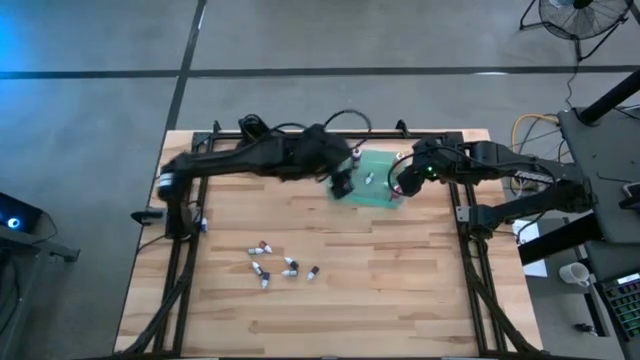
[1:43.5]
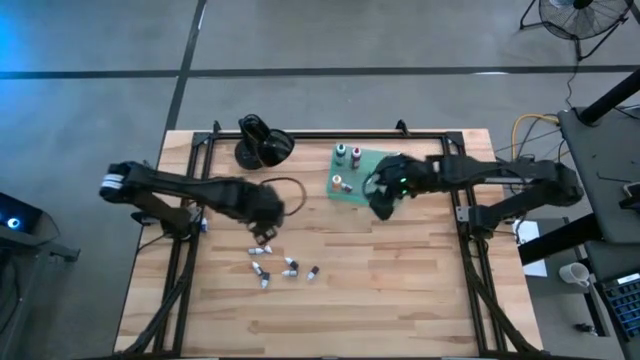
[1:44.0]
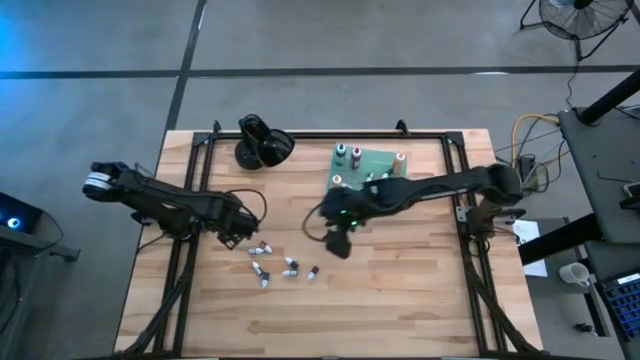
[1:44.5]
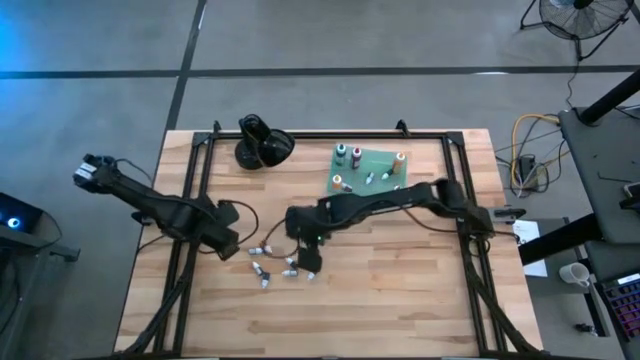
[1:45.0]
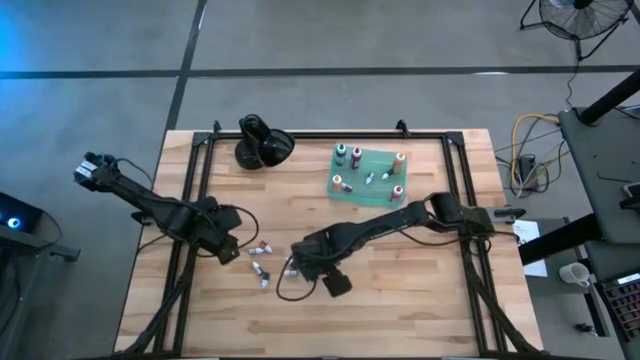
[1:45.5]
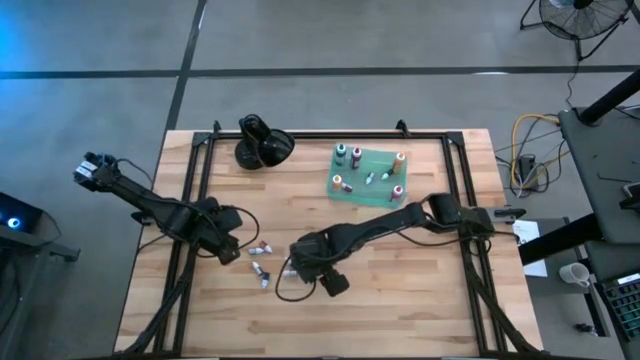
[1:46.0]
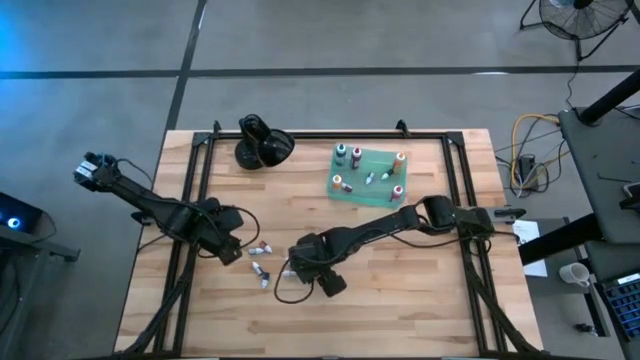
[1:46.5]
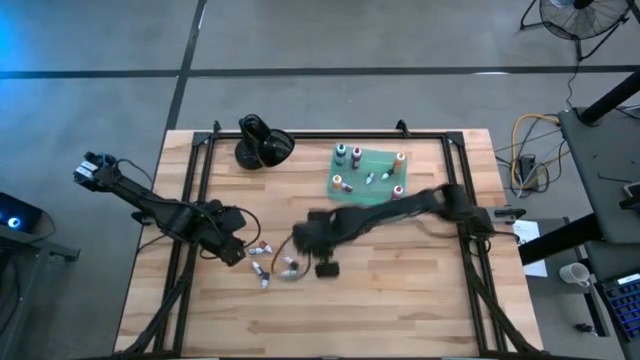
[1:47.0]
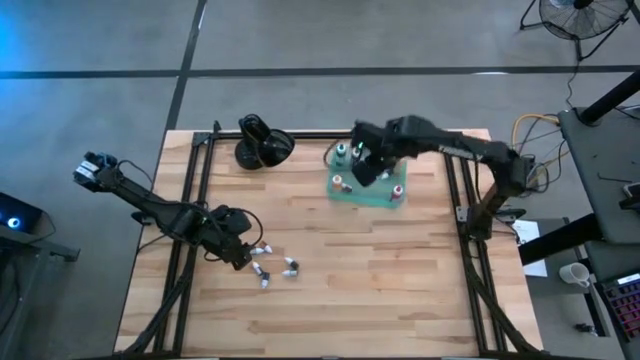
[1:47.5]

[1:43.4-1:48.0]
Task: Pick & Place food coloring
Put the red food coloring bottle into the green bin

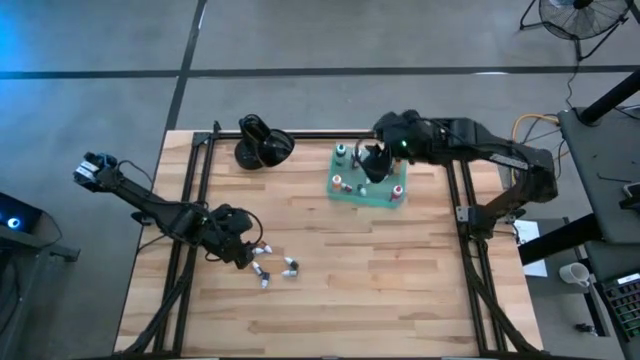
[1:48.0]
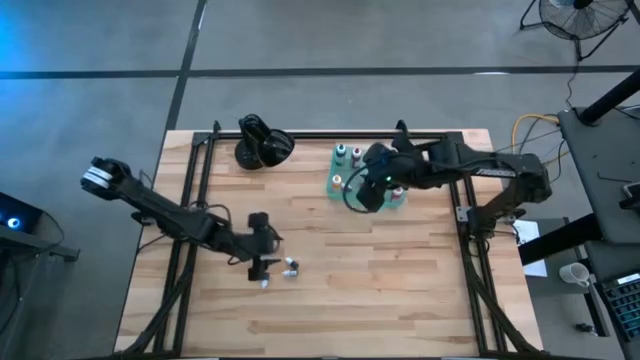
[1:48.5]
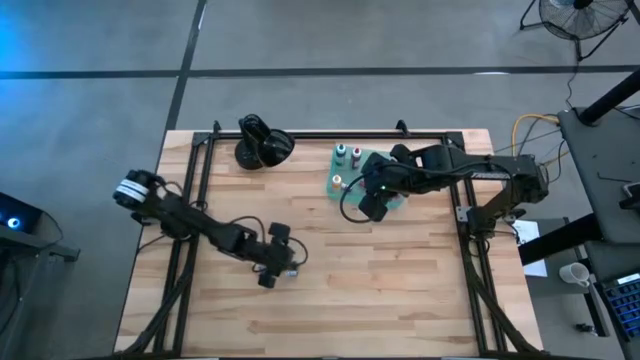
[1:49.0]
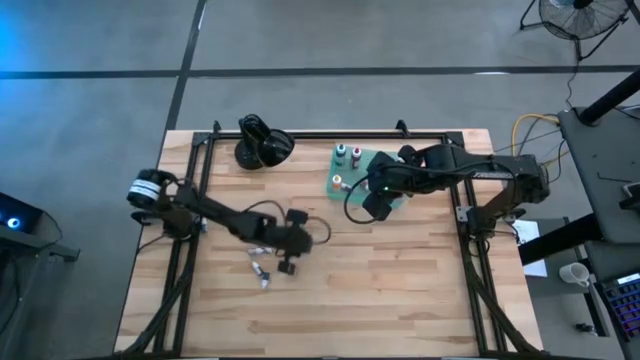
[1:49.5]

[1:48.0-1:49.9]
Put the green food coloring bottle into the green bin

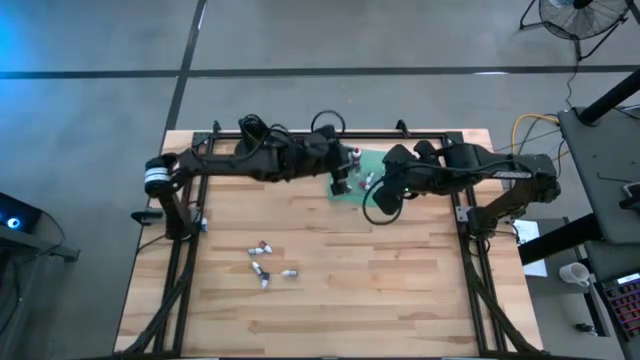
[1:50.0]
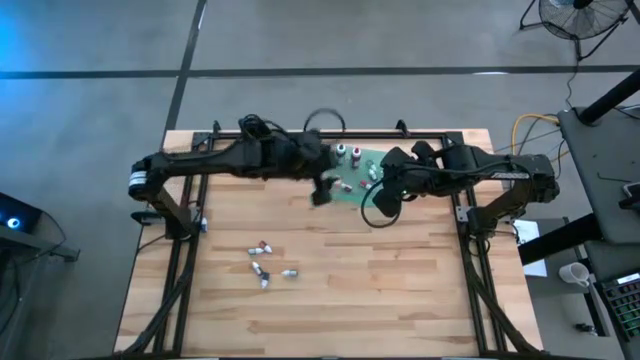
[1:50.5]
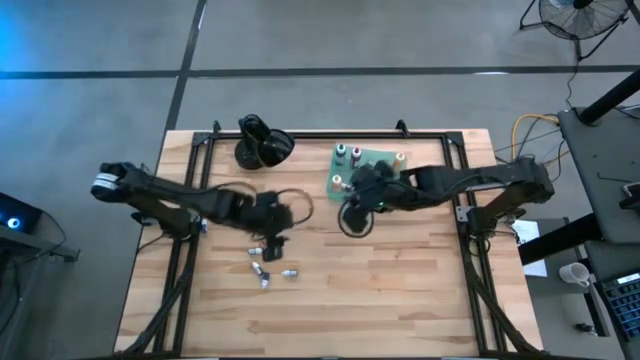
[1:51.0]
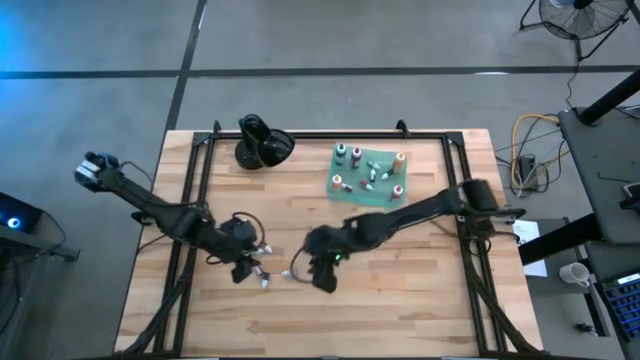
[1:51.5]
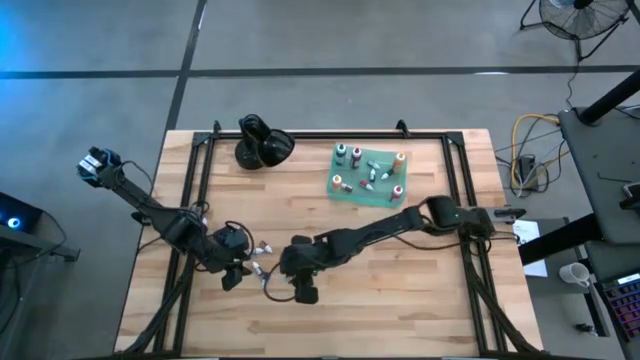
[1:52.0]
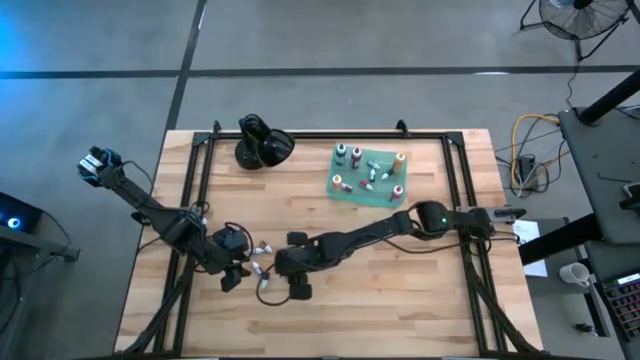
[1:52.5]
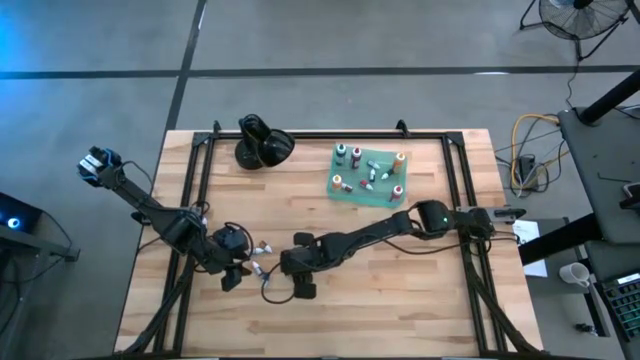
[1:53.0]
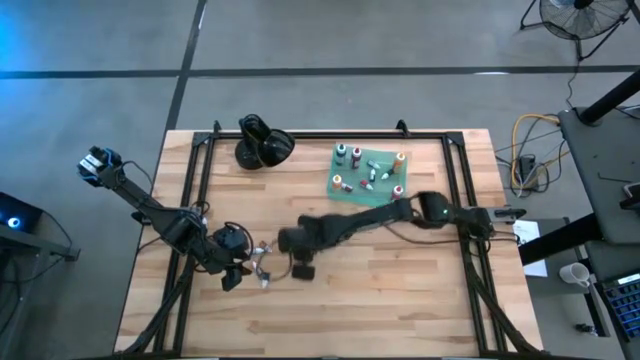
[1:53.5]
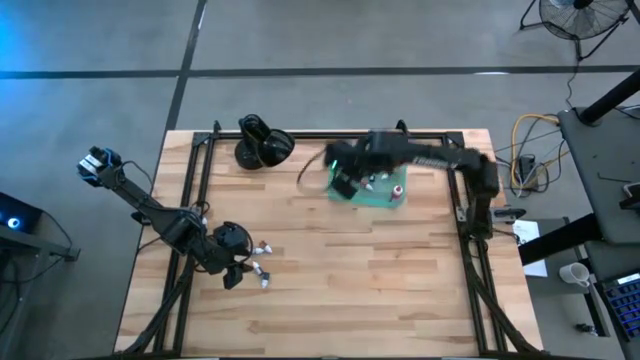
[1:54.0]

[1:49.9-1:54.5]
Put the green food coloring bottle into the green bin

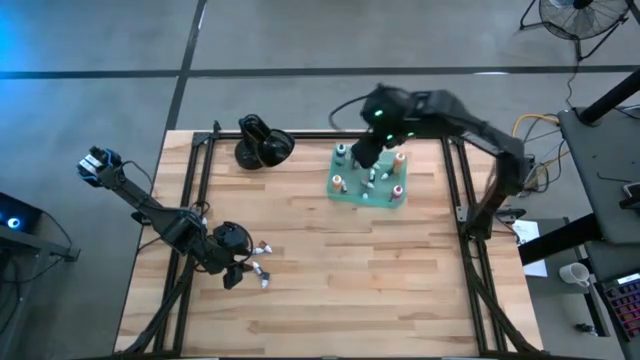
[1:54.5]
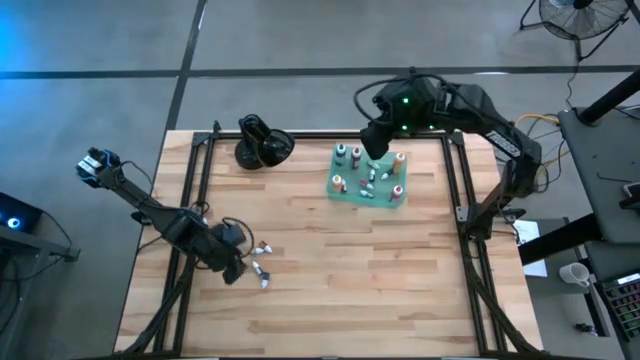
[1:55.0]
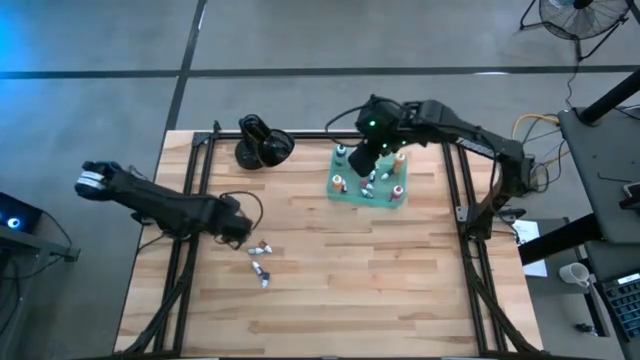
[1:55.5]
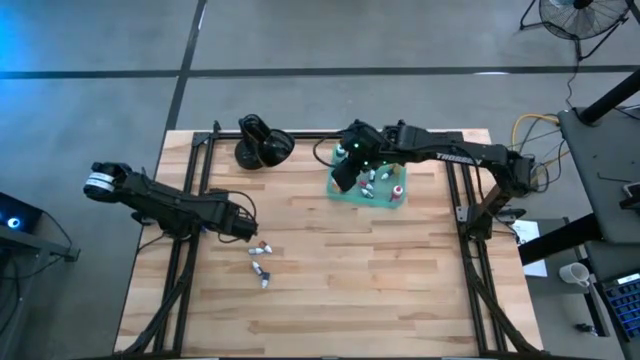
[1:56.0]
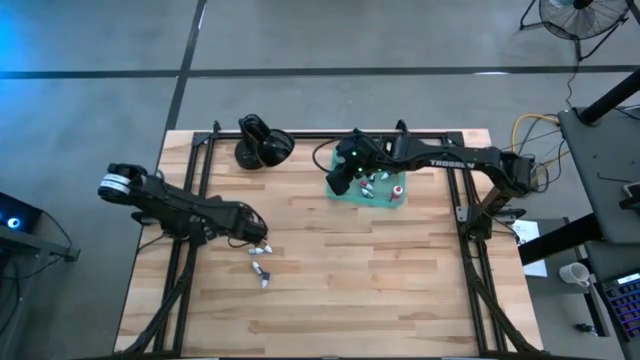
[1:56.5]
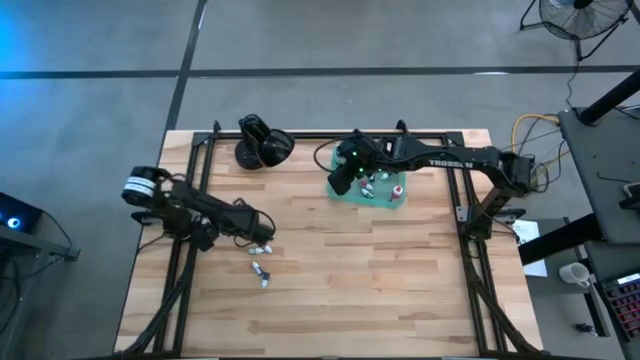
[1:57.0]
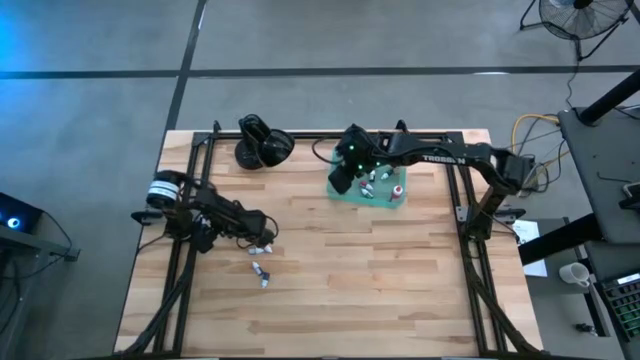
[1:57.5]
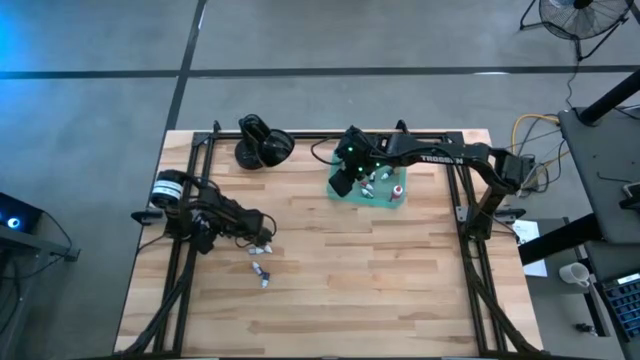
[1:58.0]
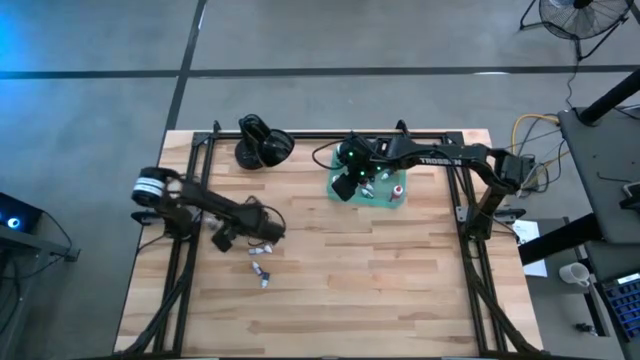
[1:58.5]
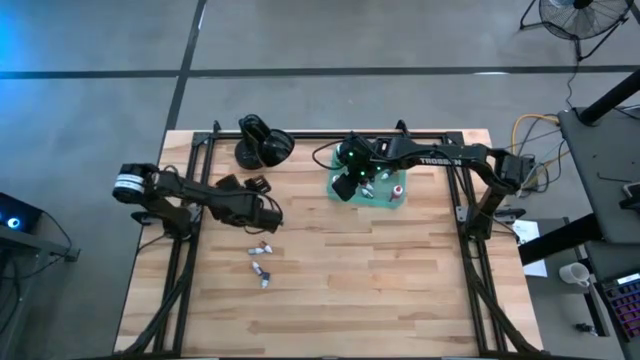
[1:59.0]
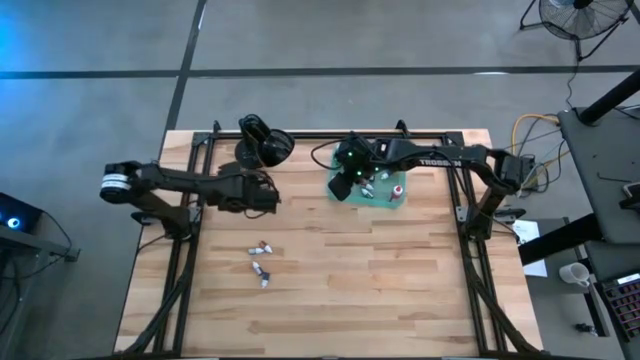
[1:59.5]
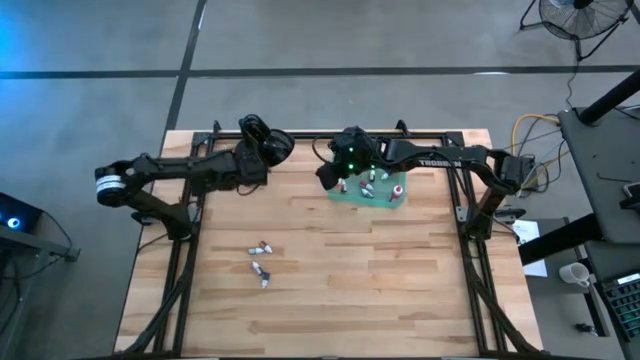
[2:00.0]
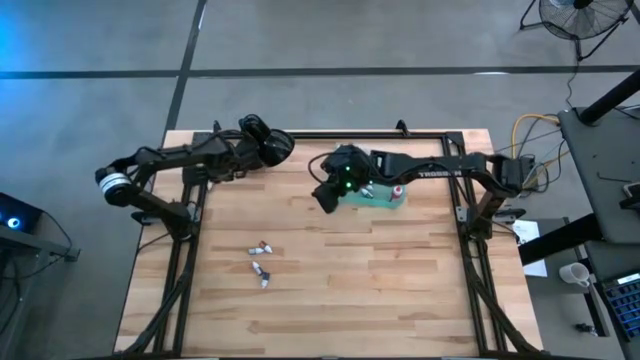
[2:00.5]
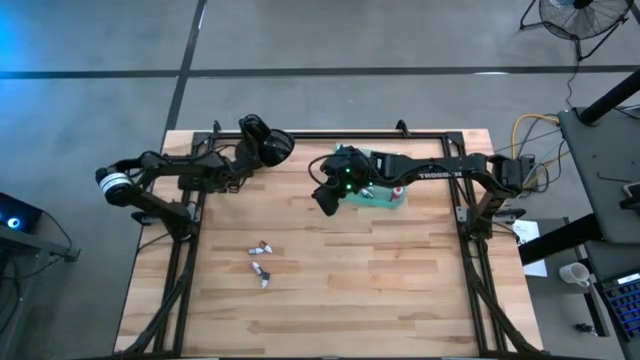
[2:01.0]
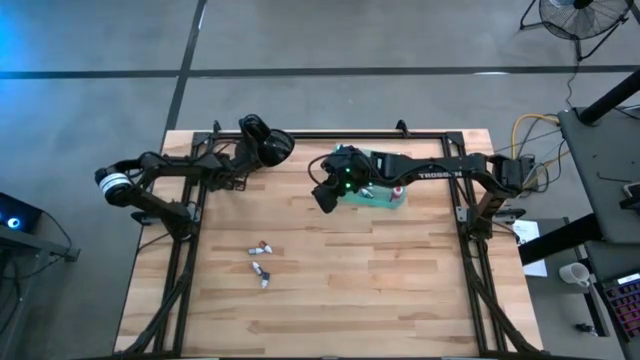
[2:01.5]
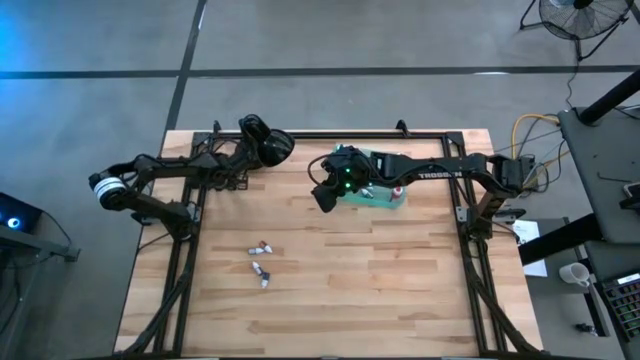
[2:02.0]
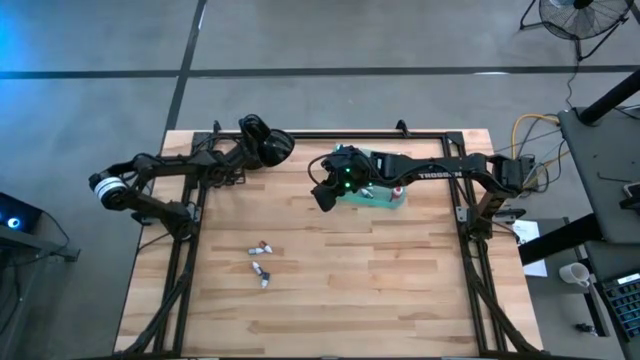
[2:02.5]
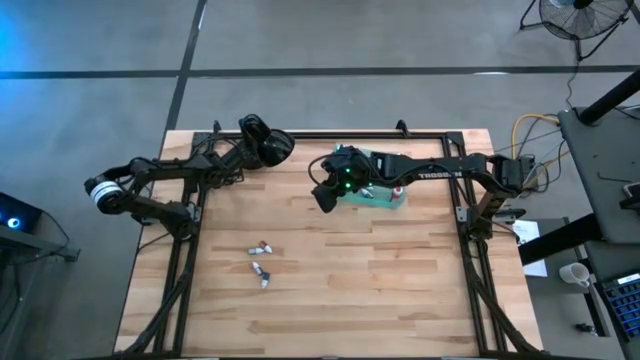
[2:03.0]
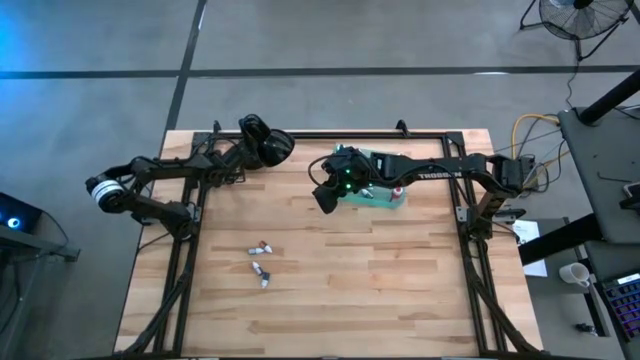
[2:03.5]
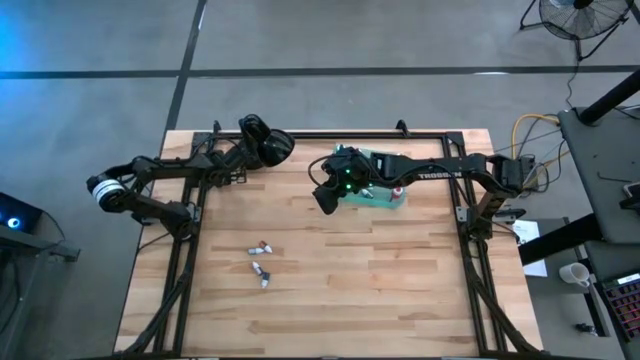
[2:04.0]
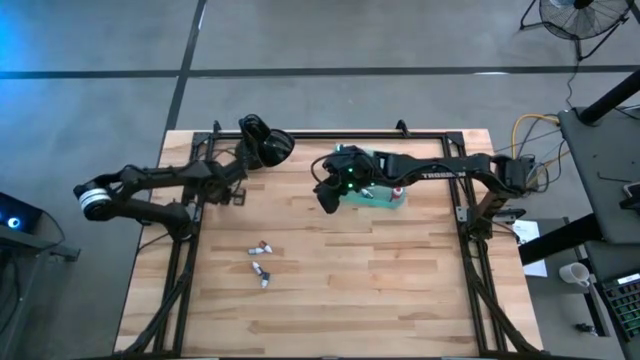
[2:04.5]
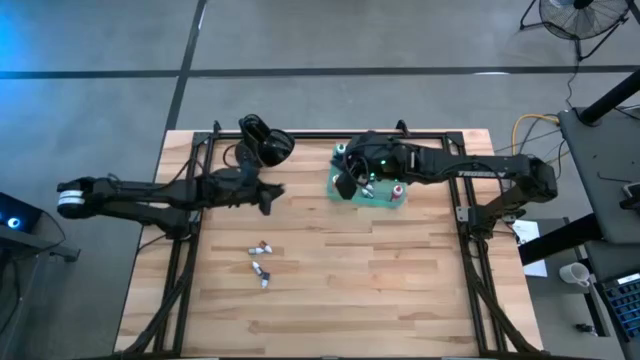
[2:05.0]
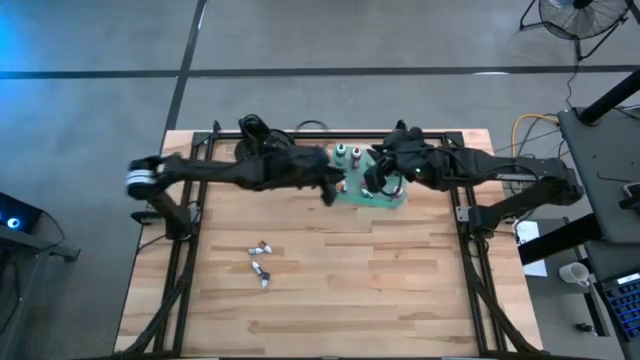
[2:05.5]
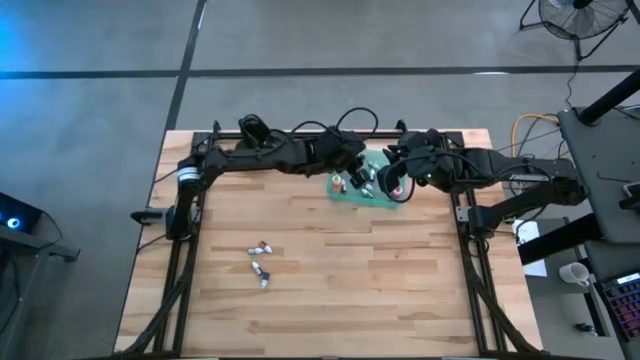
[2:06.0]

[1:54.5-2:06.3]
Put the dark blue food coloring bottle into the green bin
